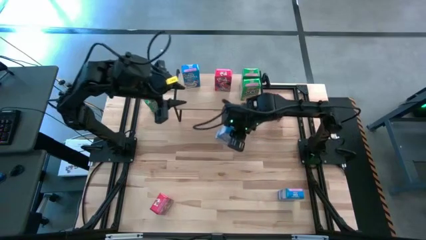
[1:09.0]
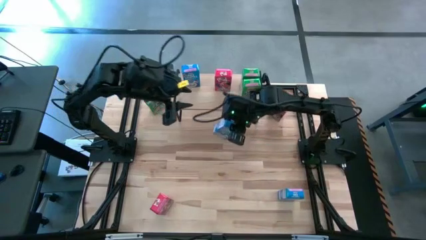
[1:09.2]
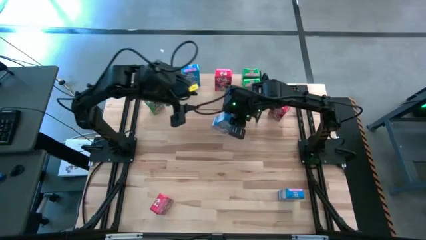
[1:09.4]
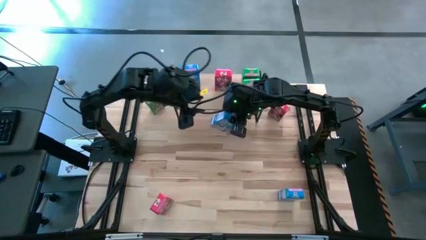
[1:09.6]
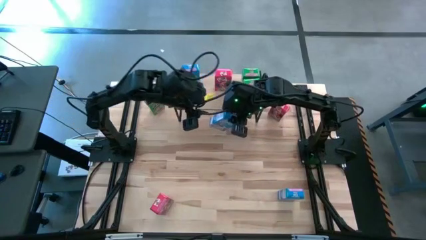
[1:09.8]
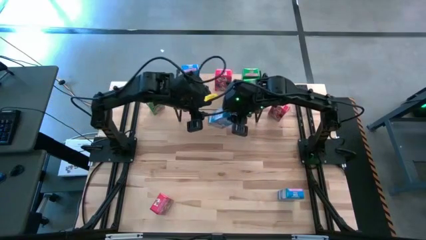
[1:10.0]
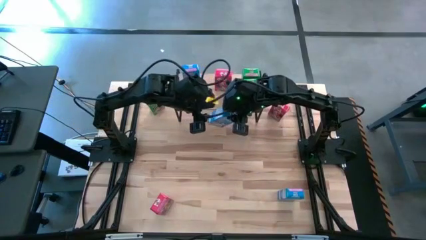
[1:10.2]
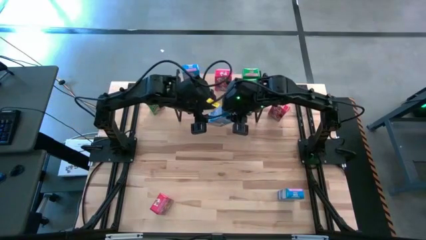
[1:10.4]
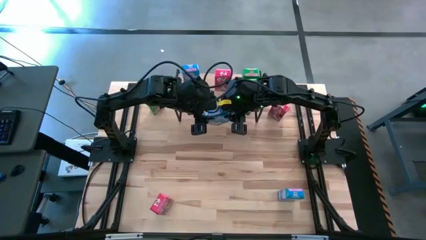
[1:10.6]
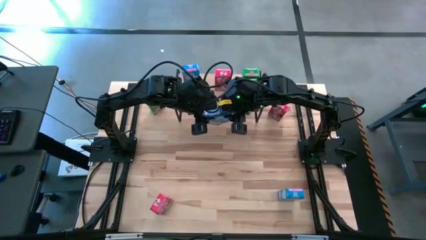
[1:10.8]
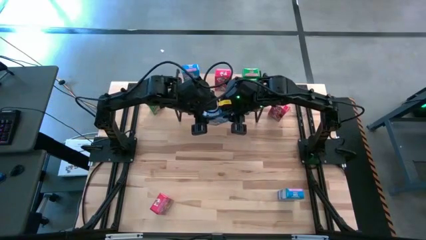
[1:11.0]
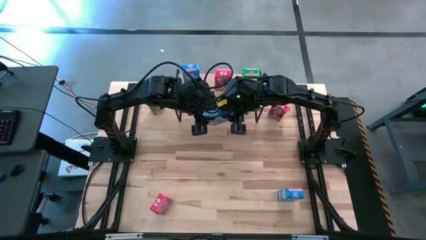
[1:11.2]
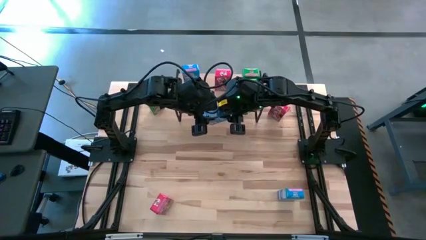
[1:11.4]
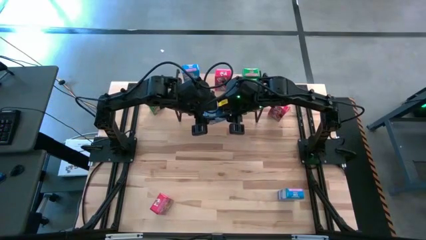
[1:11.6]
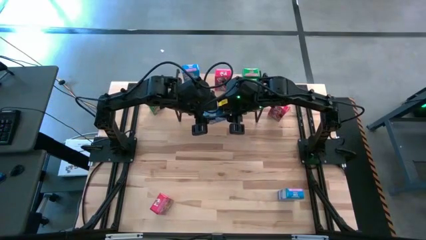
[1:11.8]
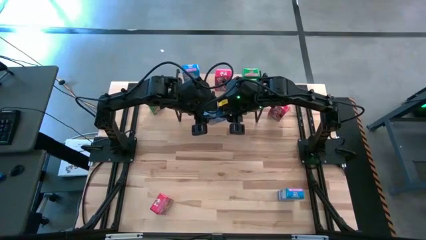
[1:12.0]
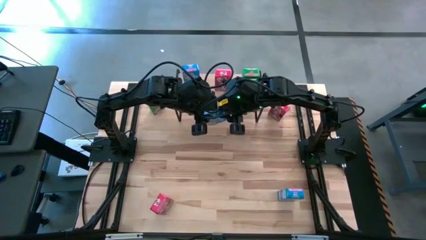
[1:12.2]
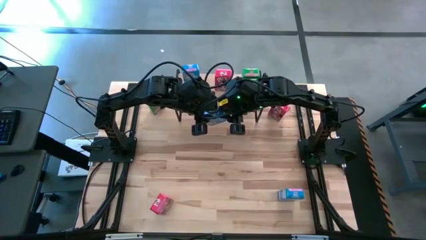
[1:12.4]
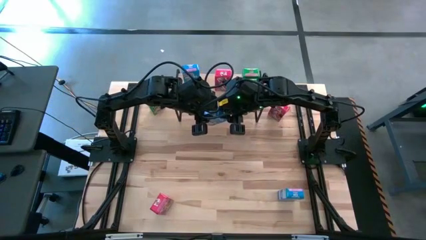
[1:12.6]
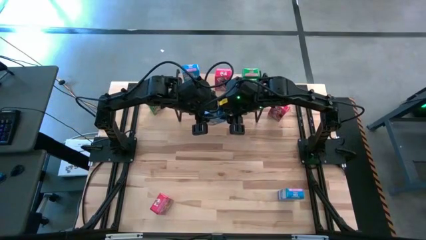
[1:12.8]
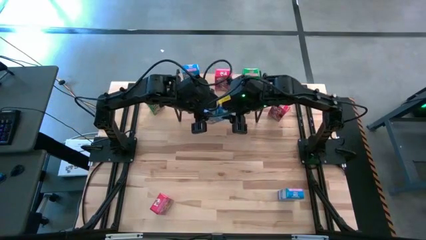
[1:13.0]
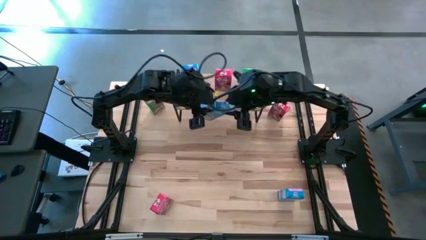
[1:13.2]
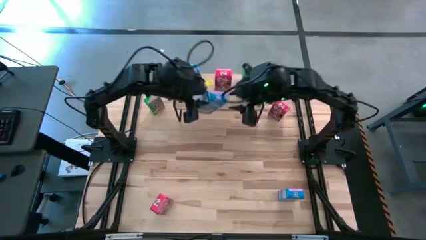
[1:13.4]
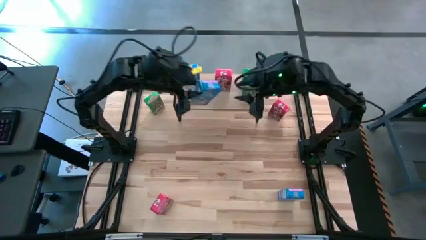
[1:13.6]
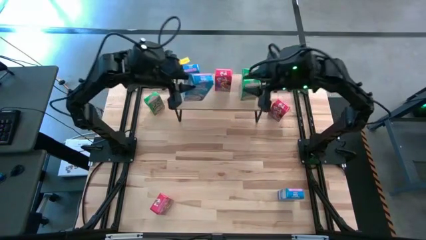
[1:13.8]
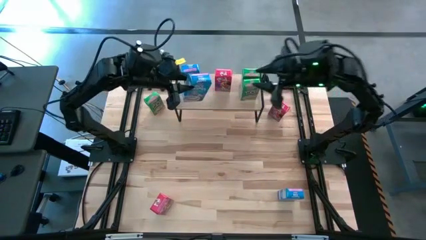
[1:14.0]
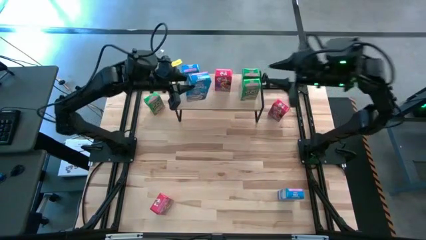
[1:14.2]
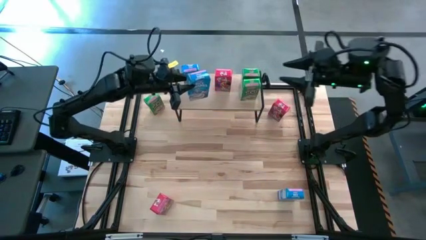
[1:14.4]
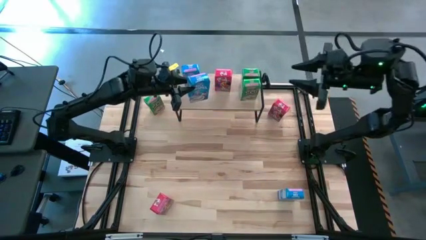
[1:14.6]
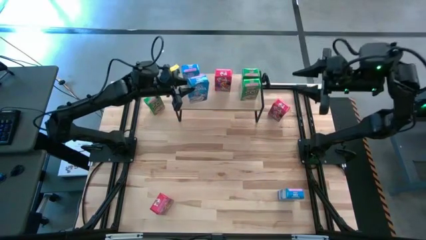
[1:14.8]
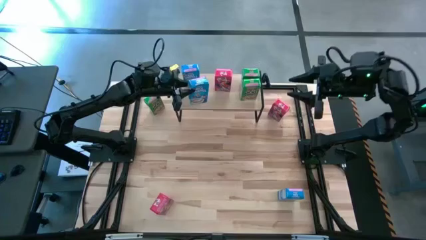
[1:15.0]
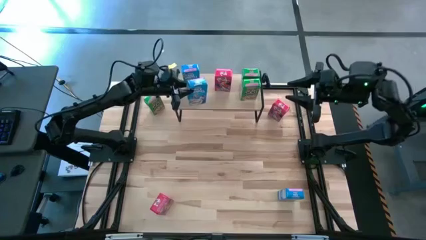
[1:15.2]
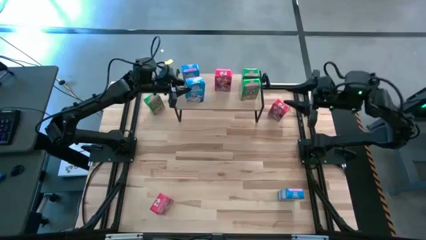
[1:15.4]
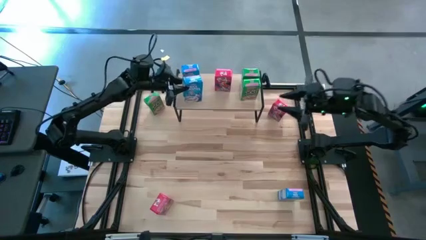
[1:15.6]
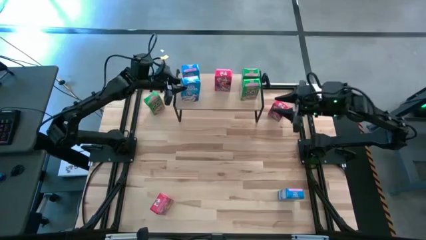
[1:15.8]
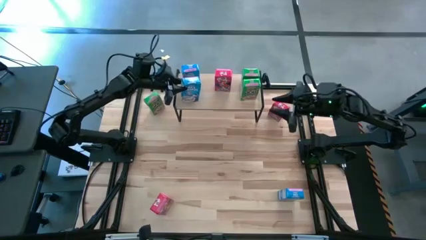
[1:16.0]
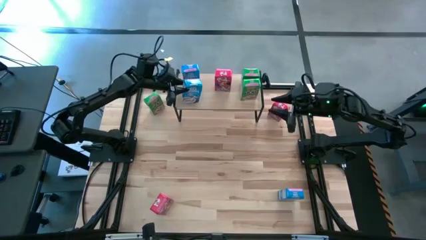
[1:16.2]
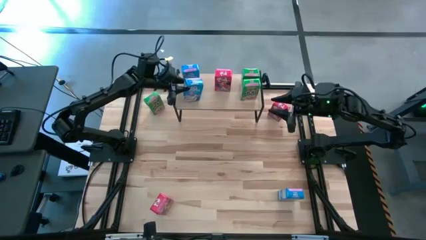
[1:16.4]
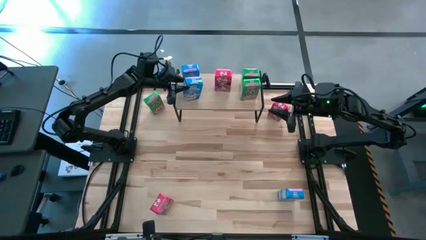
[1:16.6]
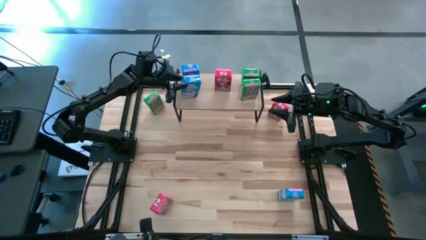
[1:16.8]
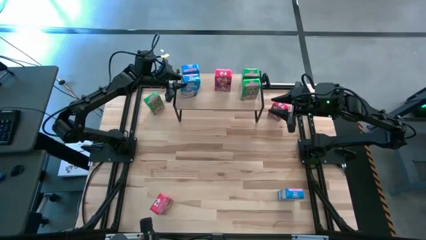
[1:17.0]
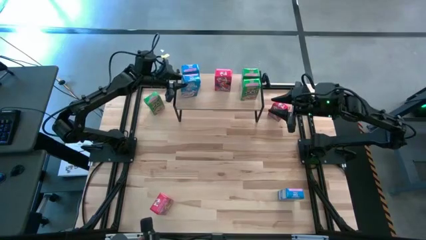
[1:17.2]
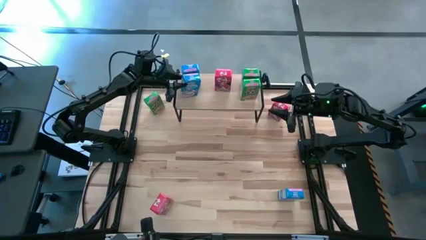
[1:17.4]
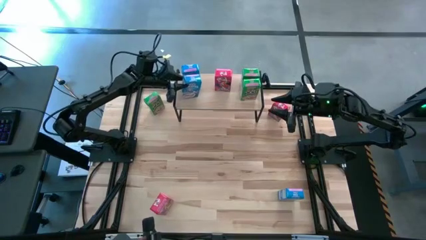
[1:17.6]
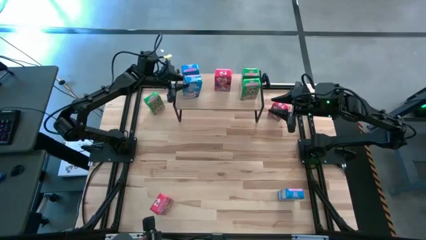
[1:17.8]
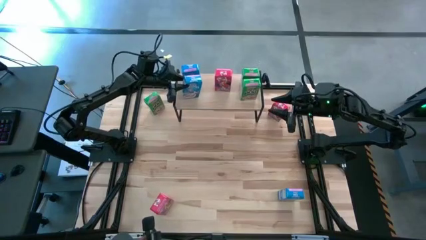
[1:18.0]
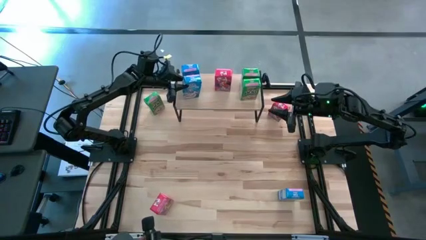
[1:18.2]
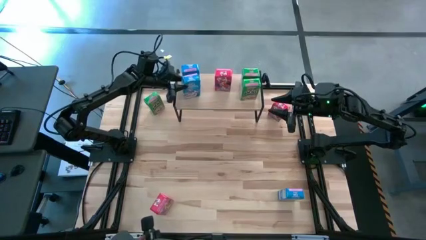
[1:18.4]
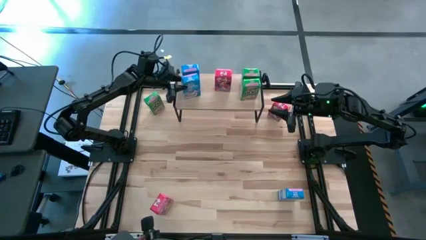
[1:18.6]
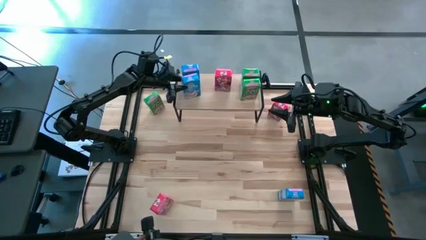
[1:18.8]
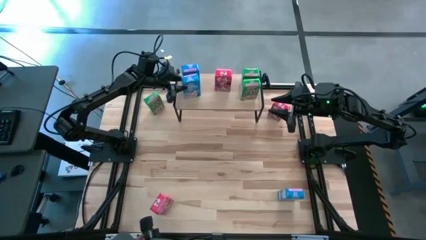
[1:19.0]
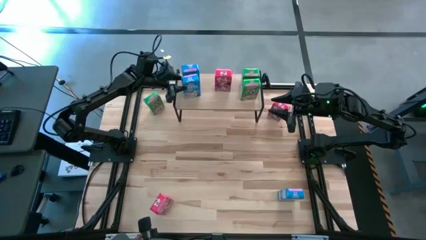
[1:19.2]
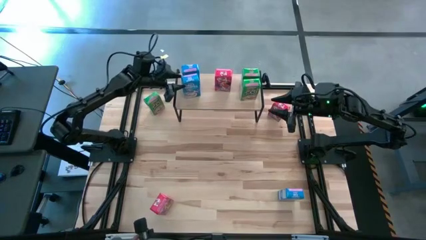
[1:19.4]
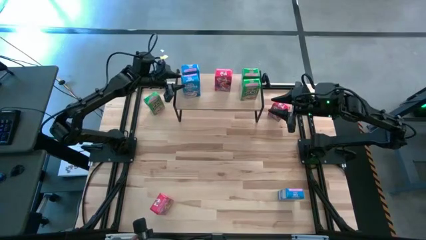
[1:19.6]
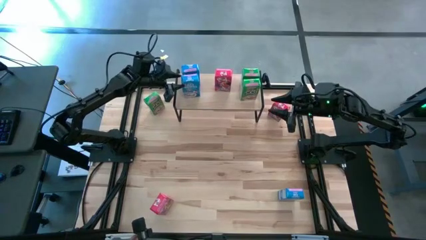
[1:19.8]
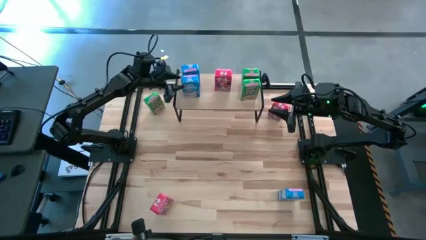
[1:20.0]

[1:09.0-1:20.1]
Task: Stack cereal on shelf
Put the bottom blue cereal box on the shelf aligned with the other blue cereal box

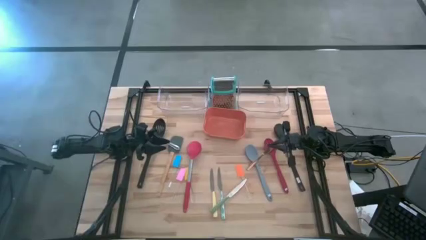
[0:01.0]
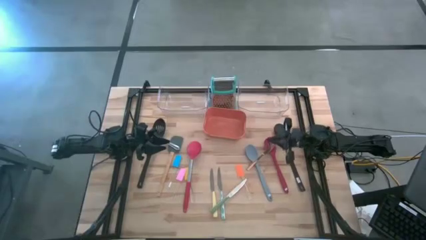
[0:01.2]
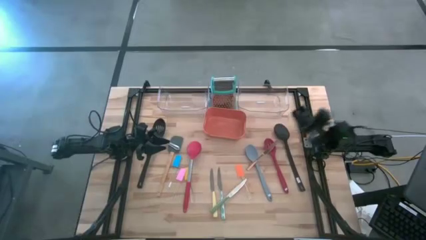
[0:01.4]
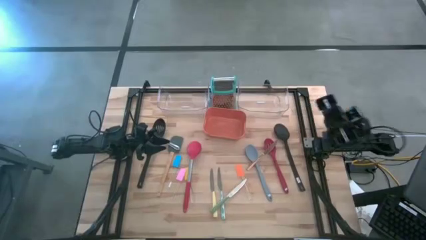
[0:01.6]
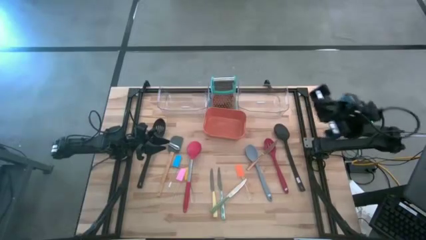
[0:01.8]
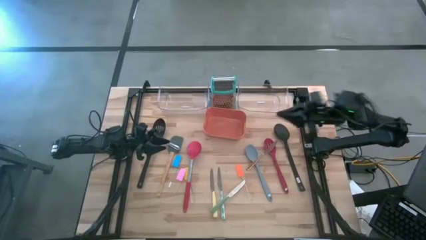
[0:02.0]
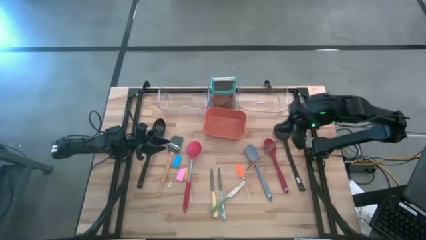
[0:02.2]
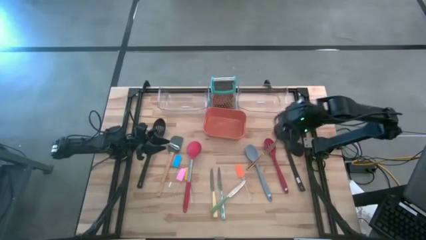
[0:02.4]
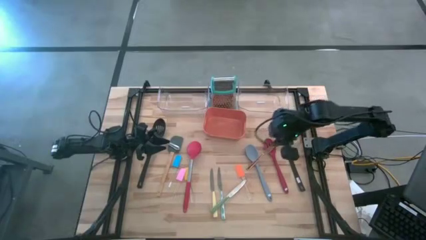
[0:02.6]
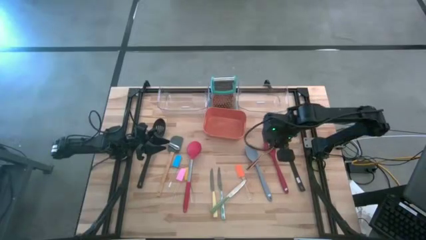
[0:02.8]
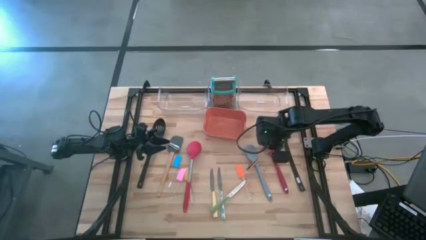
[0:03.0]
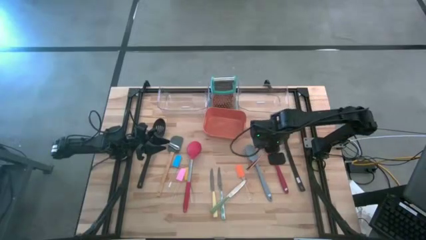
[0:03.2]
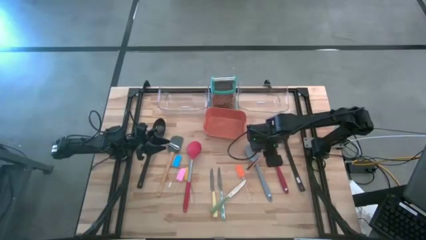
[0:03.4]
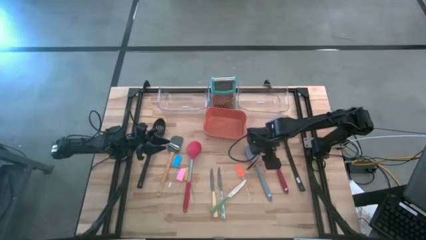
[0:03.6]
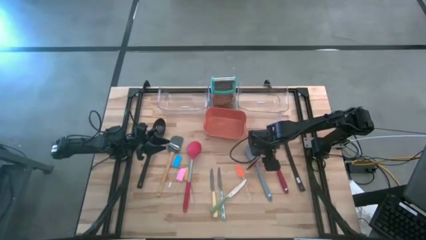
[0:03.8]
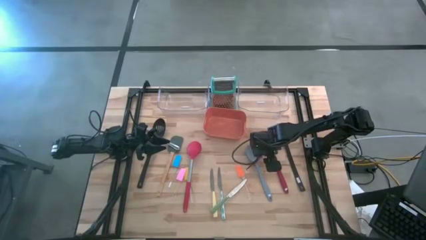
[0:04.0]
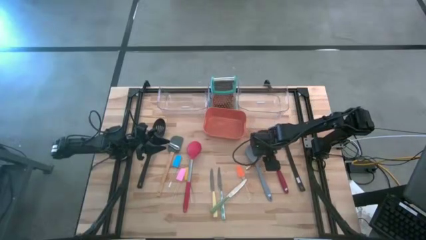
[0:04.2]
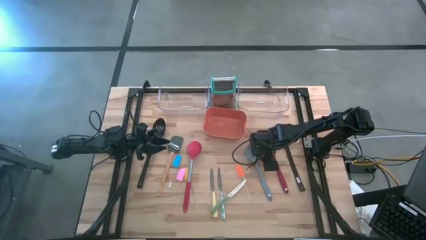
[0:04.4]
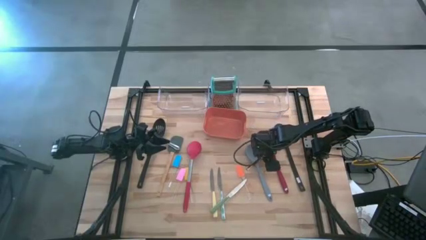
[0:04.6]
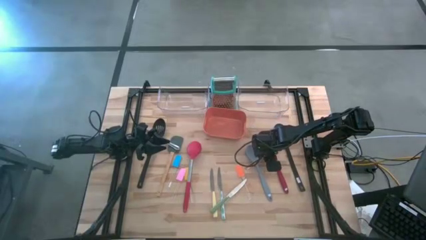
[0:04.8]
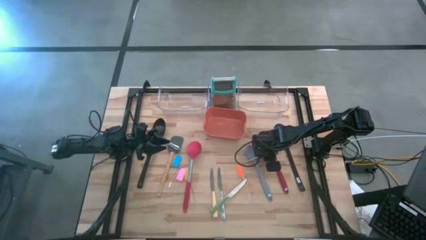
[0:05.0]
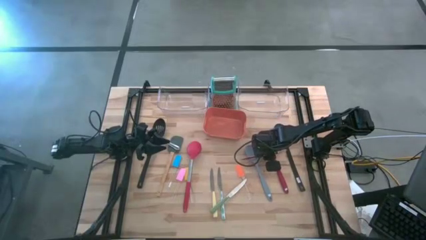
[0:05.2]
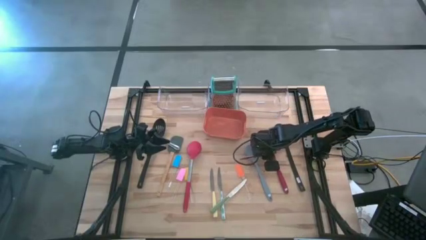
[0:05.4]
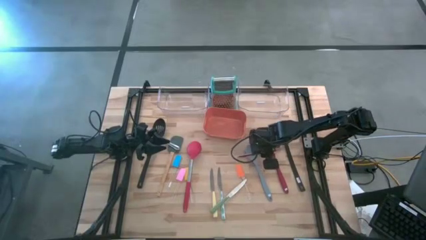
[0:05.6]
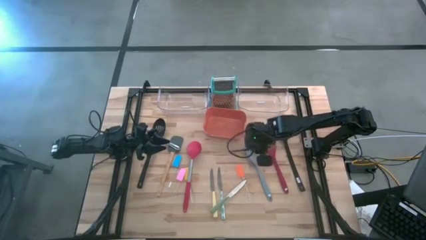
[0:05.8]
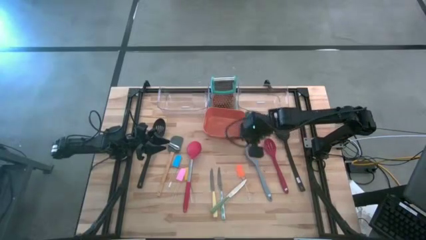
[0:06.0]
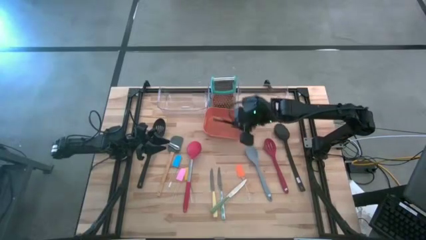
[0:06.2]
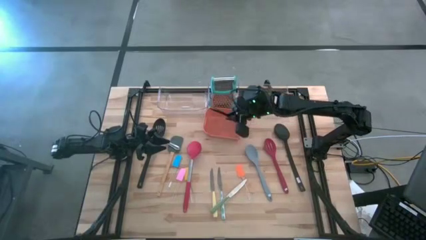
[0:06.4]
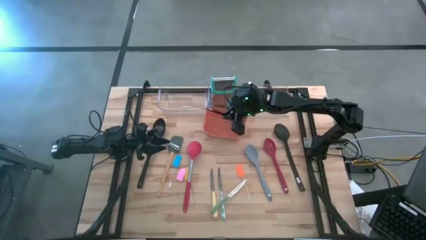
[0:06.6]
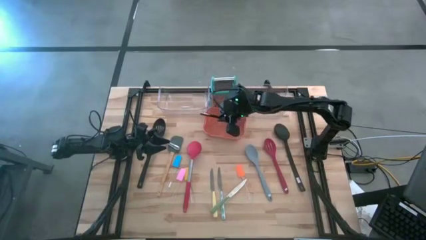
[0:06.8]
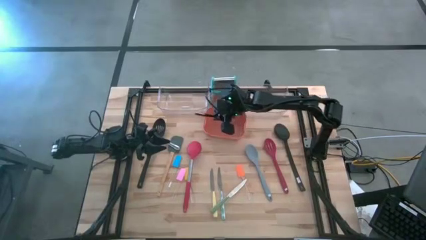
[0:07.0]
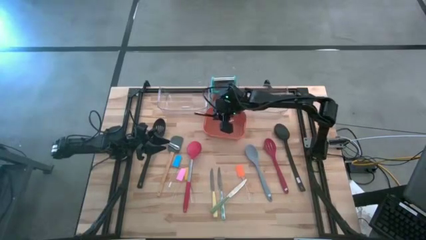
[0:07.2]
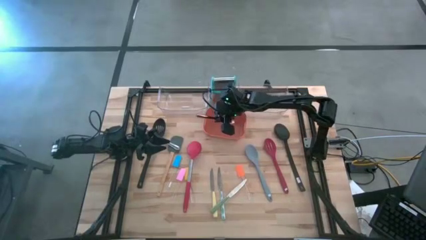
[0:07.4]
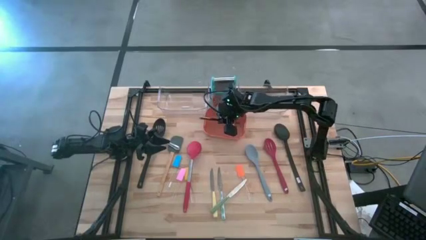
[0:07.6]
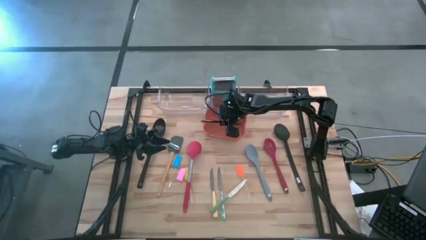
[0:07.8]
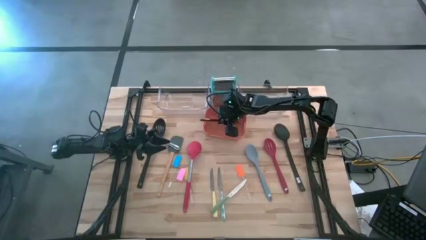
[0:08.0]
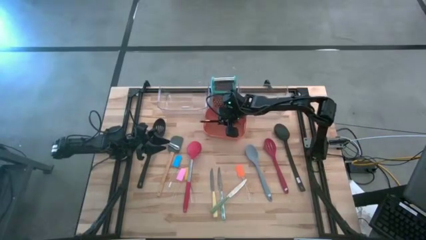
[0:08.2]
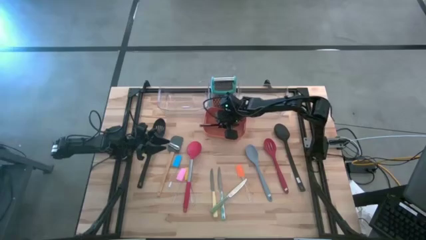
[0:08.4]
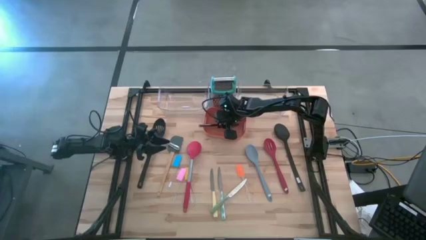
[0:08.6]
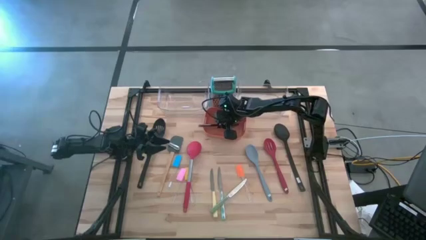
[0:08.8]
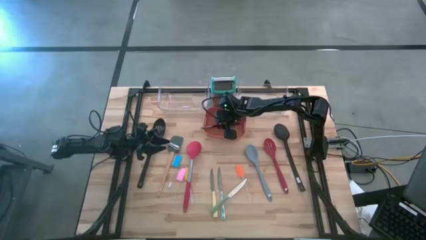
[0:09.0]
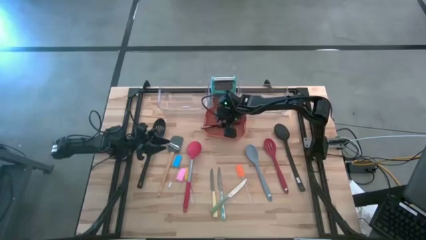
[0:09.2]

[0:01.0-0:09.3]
Task: Pick & Place Kitchen Items
Put the gold table knife into the orange bin
